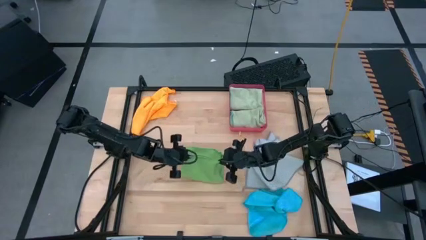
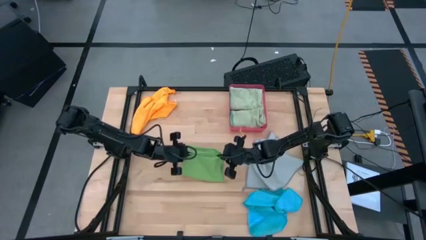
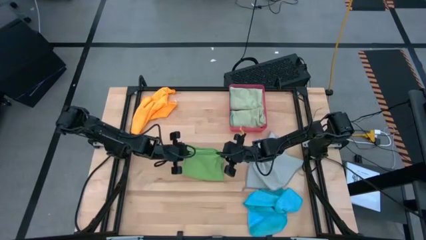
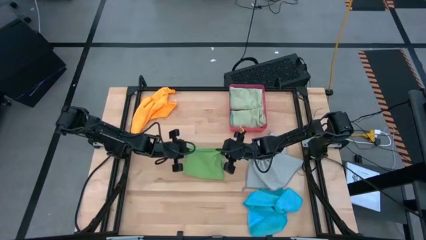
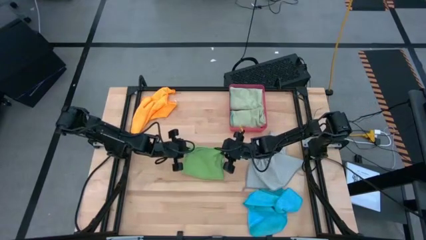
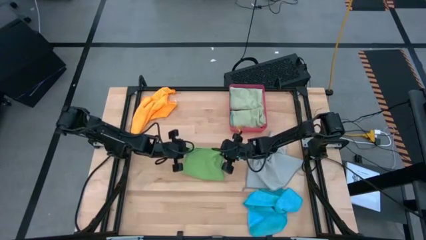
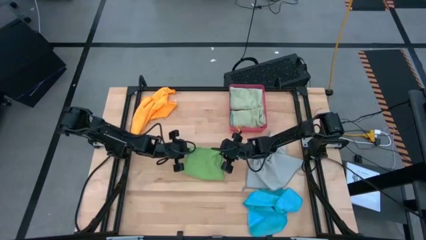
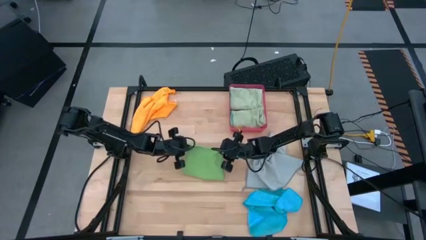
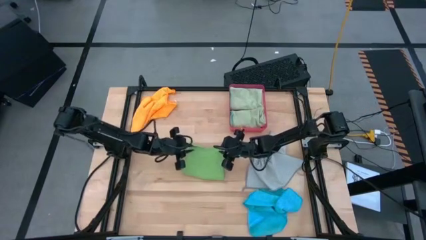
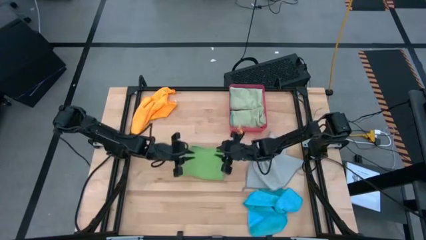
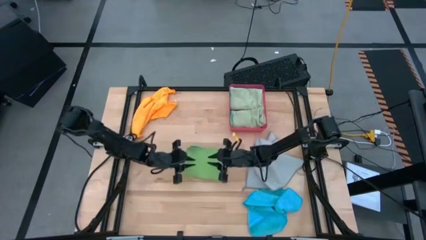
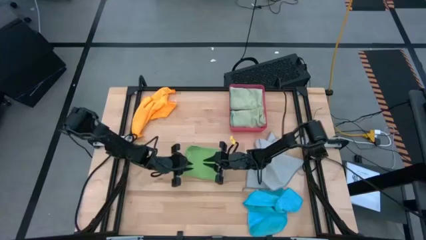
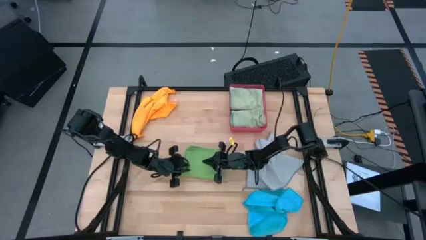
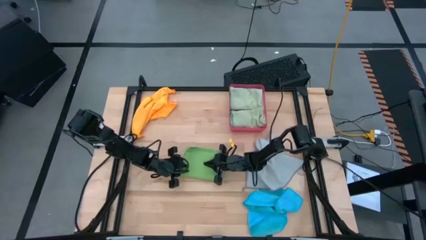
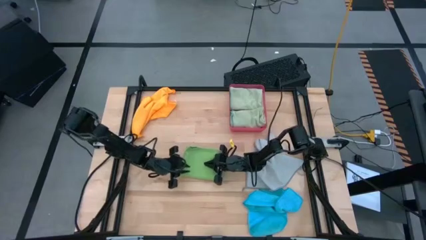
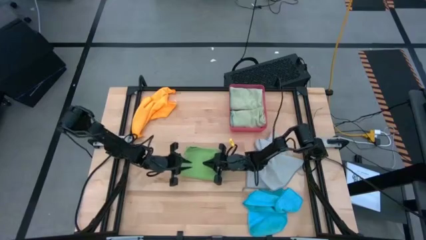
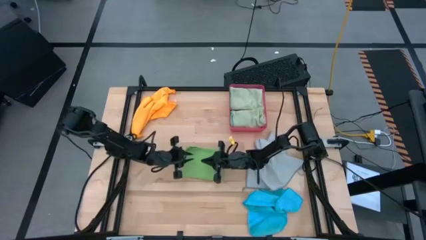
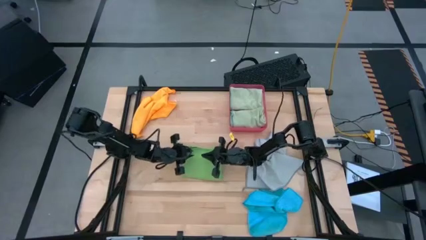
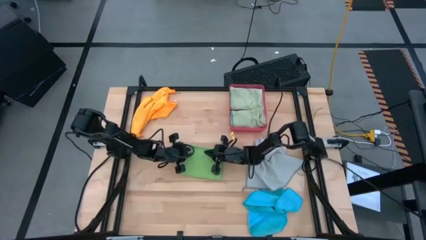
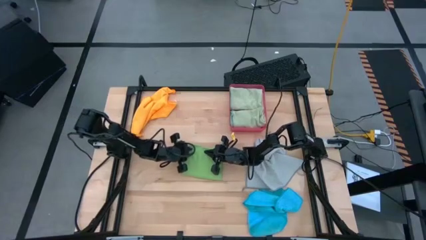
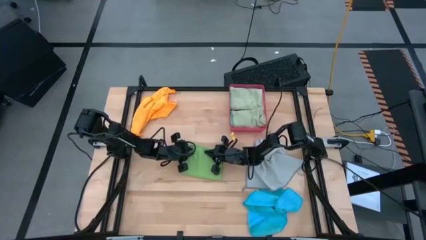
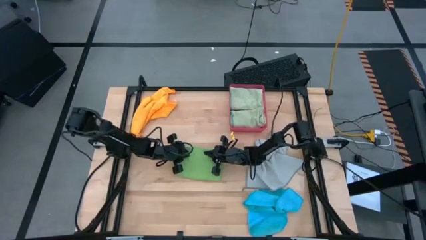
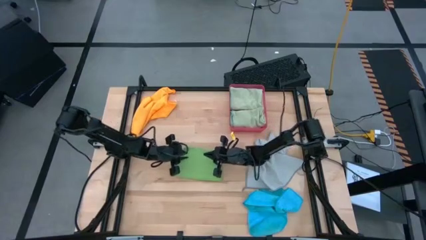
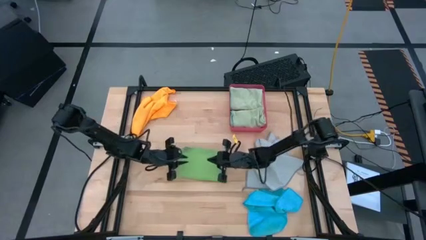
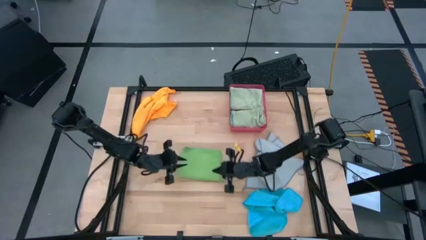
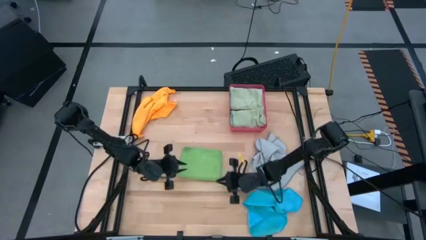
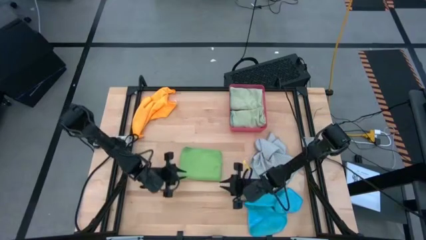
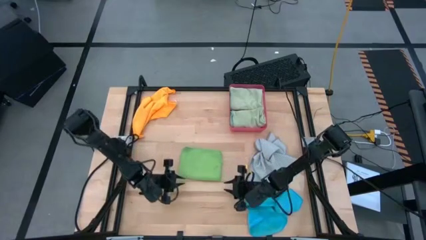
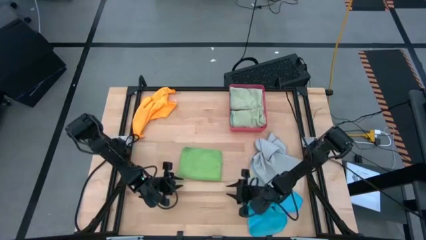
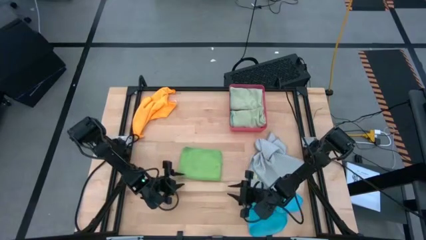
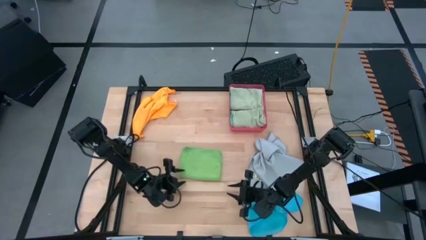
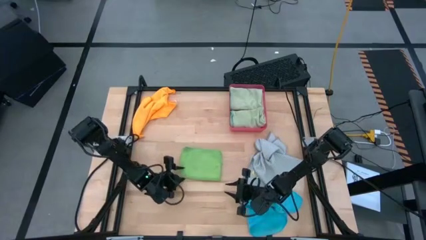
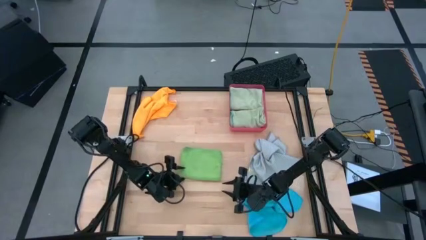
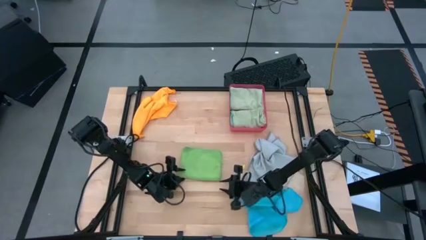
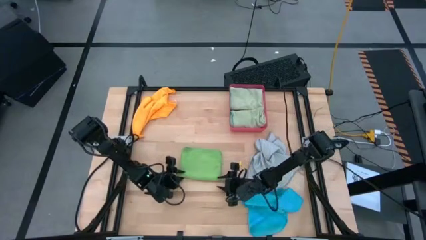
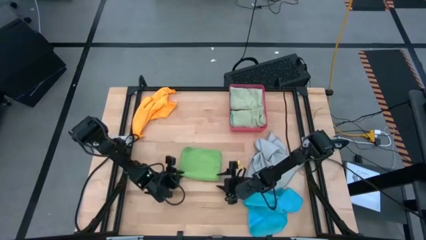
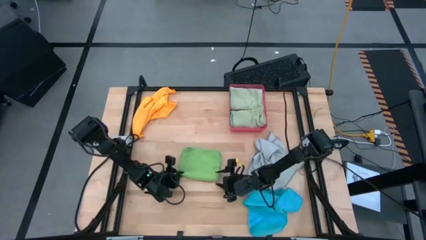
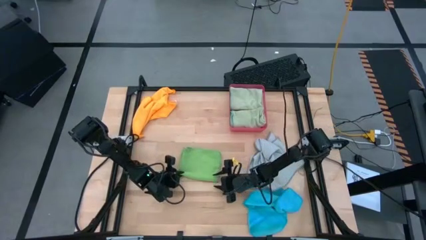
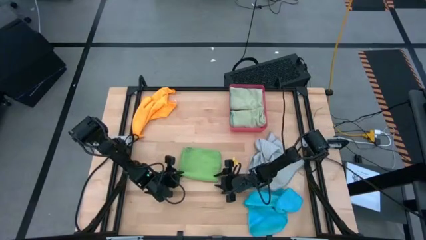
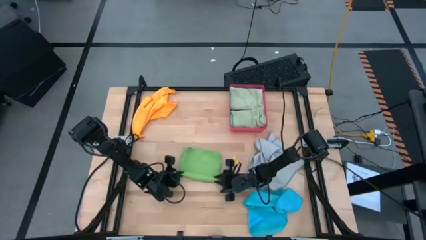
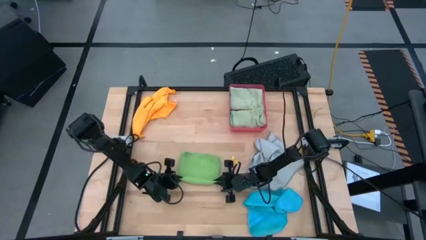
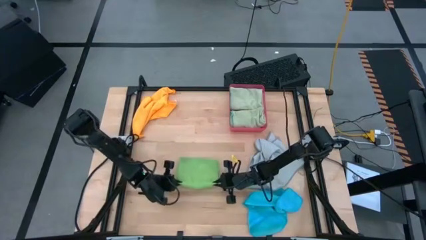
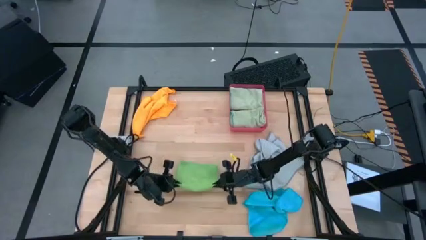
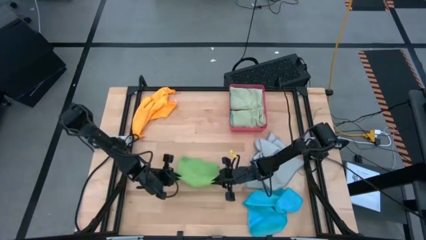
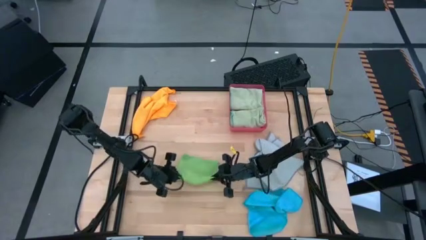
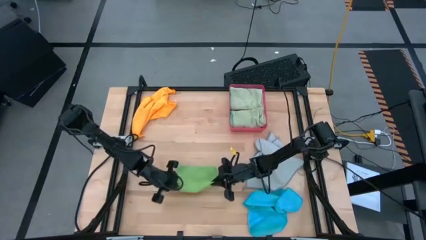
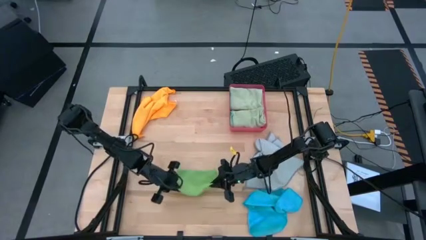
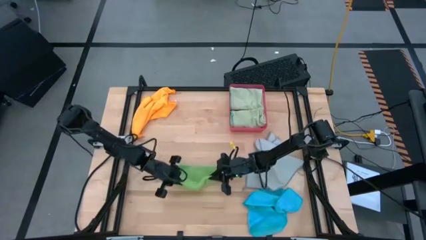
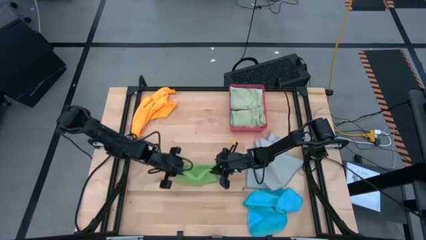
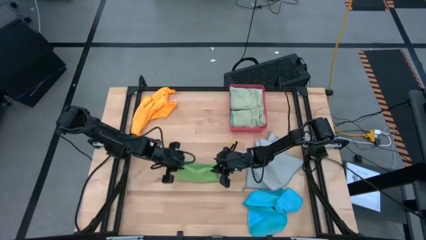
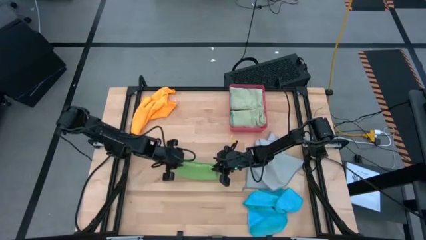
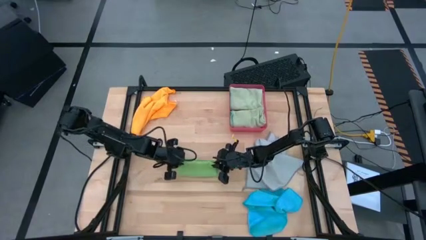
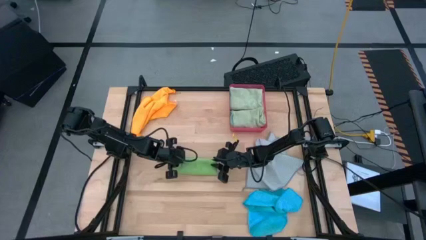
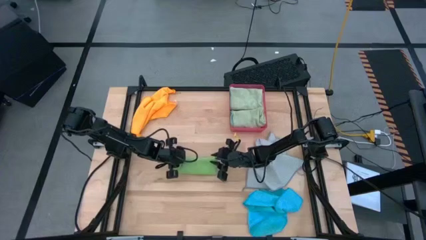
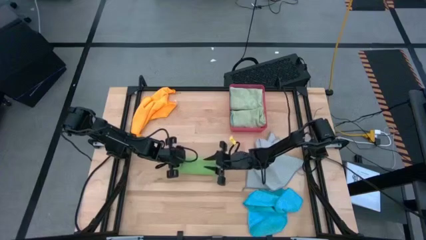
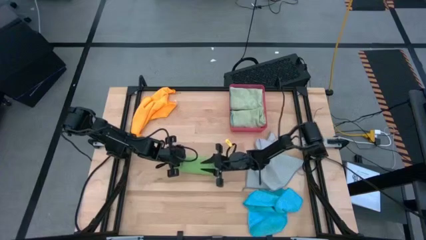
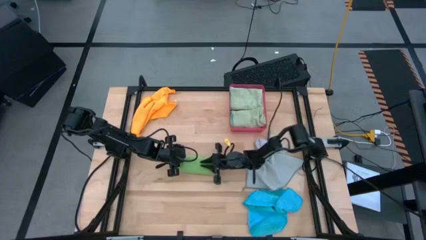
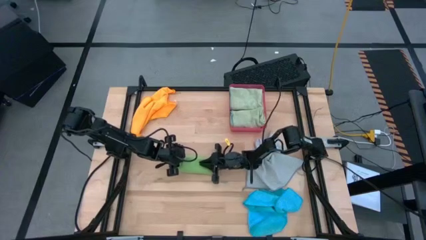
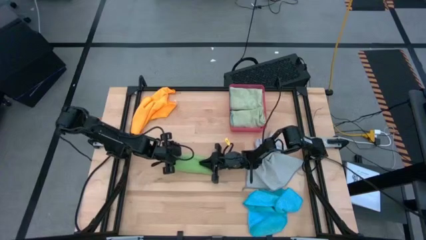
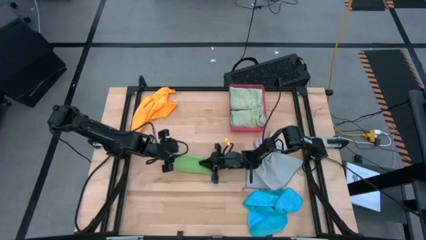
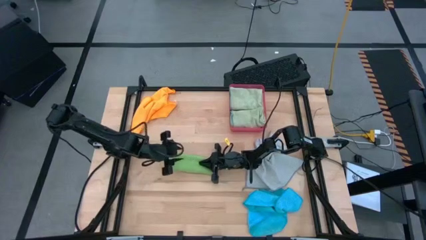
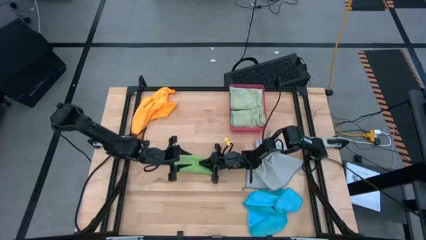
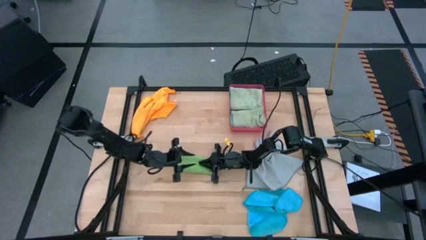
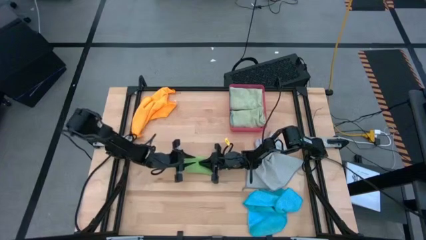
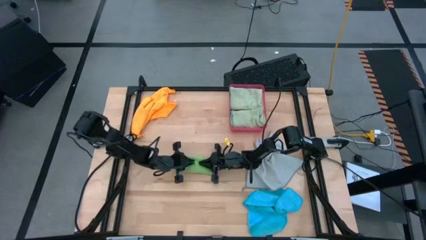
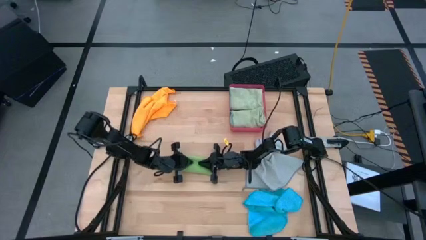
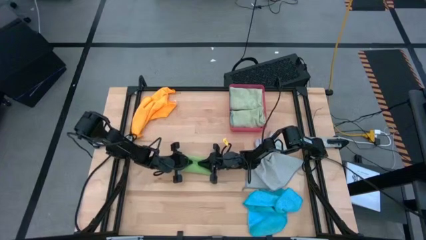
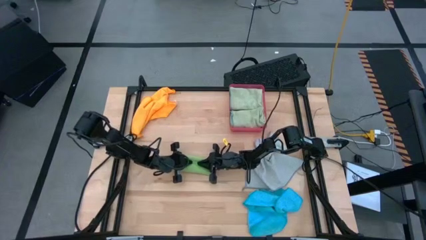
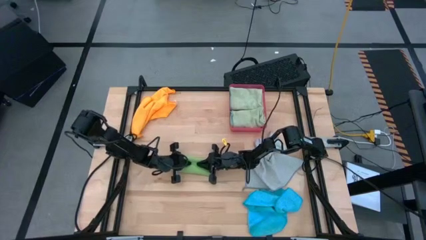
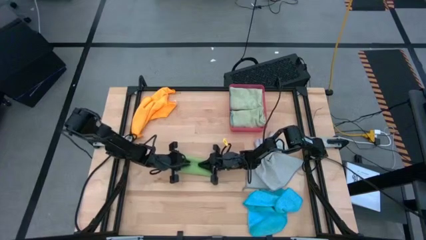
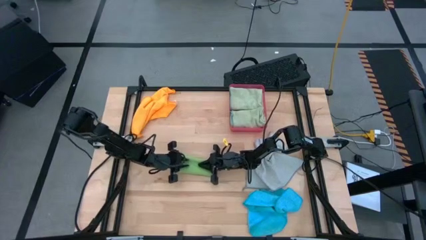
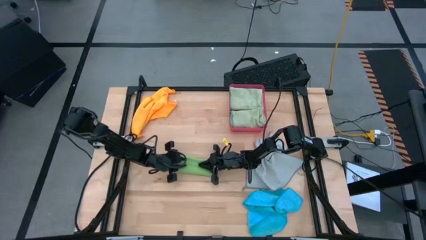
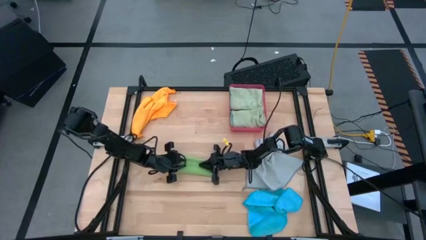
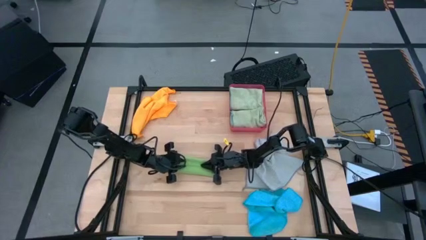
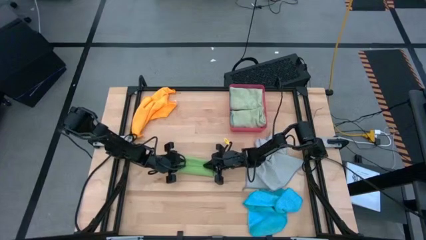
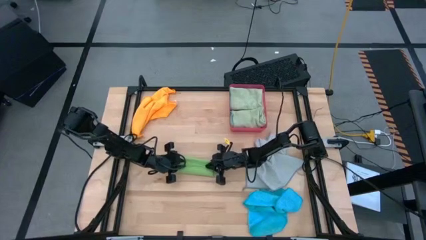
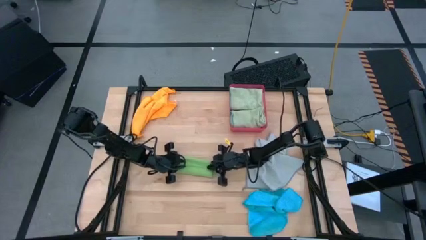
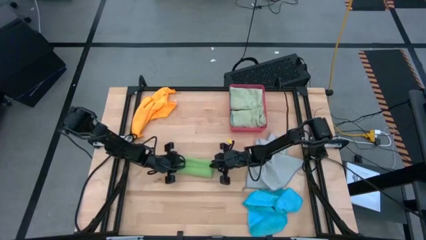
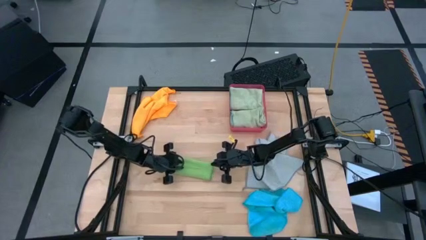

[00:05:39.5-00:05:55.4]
Task: Fold microfiber towels
Fold the dark green microfiber cloth
